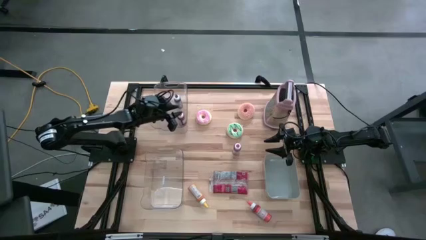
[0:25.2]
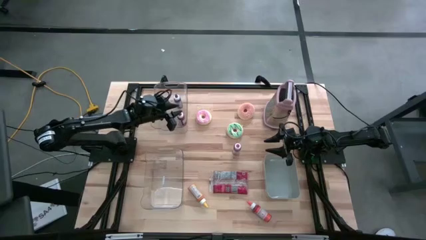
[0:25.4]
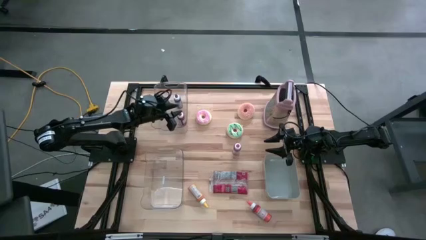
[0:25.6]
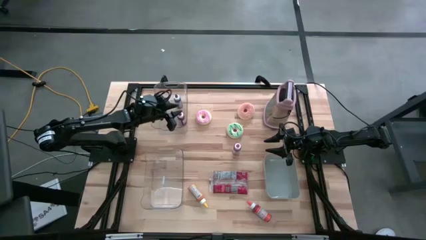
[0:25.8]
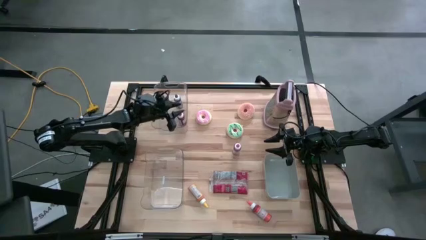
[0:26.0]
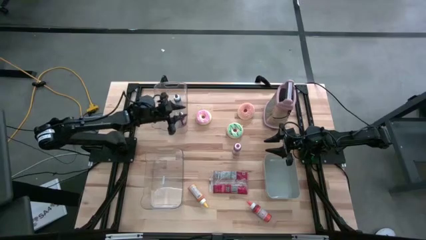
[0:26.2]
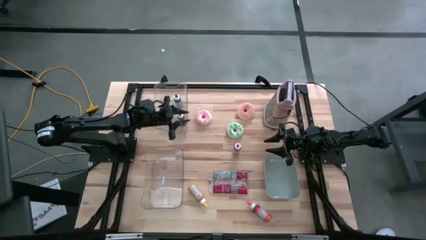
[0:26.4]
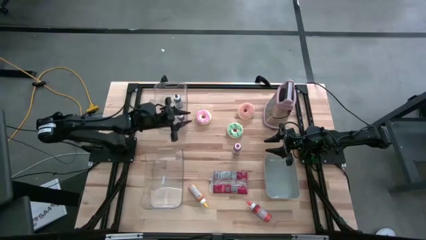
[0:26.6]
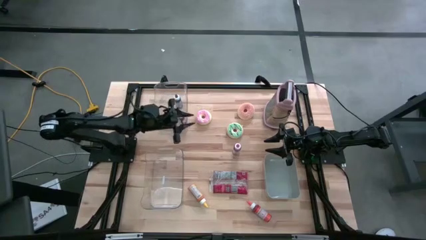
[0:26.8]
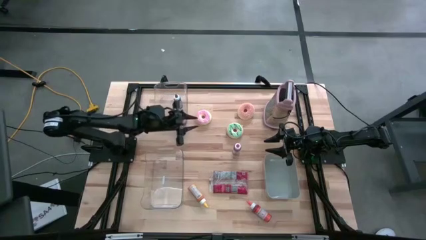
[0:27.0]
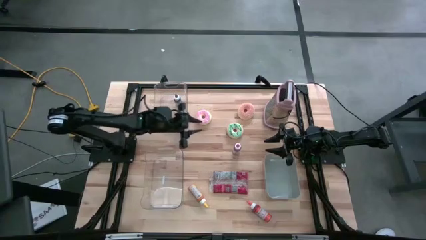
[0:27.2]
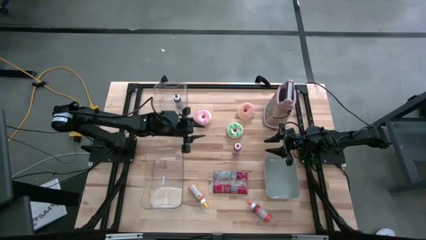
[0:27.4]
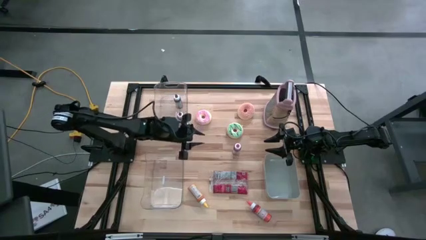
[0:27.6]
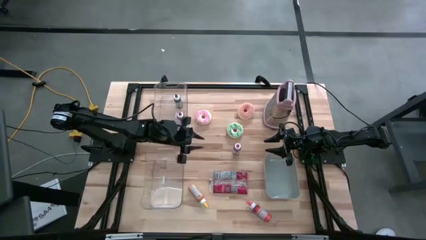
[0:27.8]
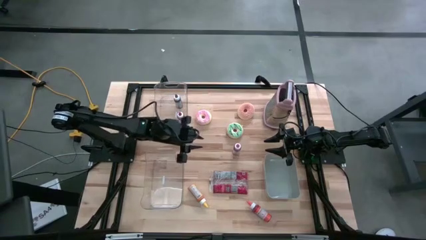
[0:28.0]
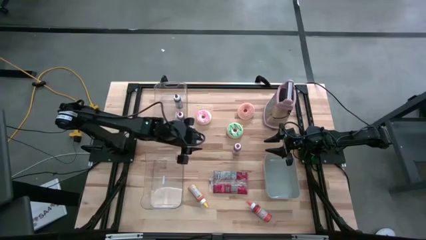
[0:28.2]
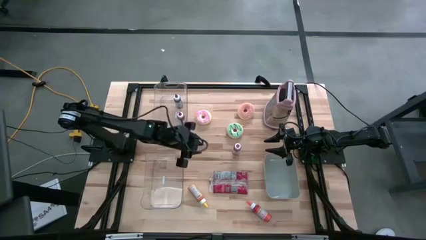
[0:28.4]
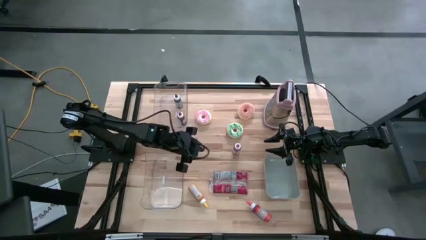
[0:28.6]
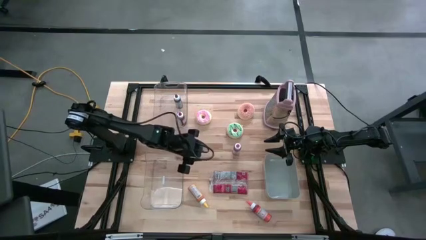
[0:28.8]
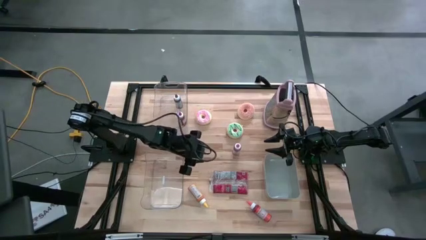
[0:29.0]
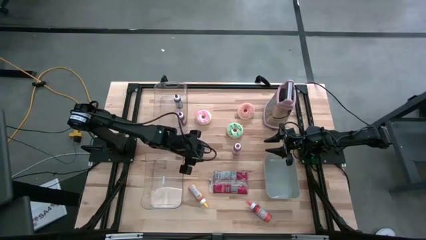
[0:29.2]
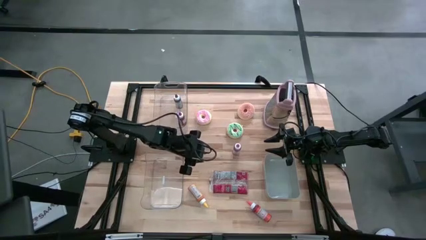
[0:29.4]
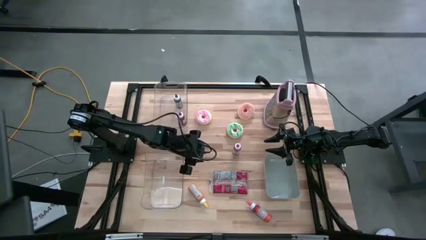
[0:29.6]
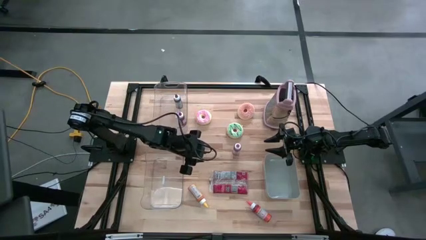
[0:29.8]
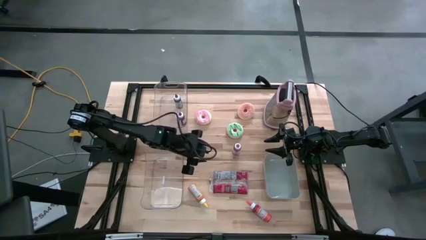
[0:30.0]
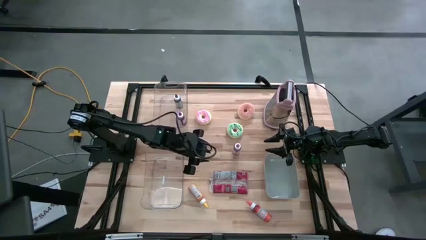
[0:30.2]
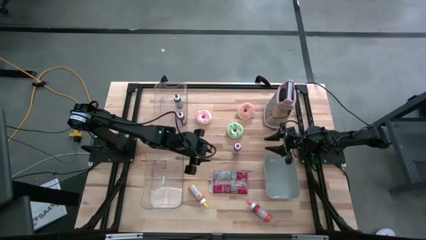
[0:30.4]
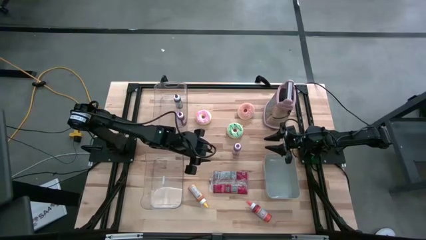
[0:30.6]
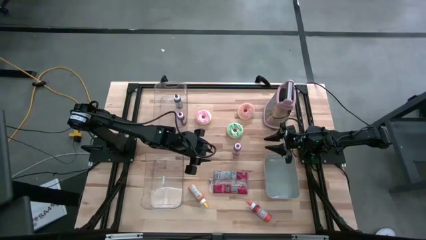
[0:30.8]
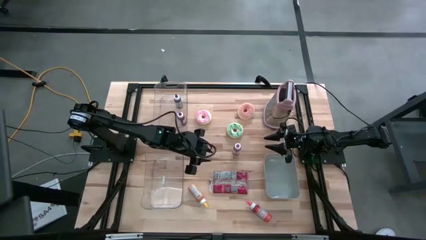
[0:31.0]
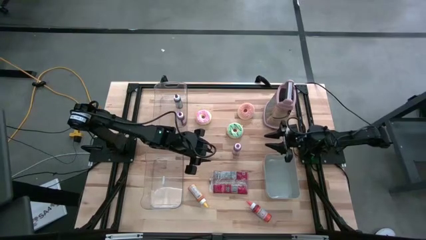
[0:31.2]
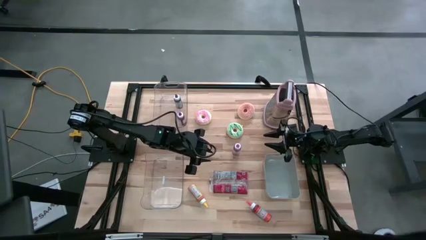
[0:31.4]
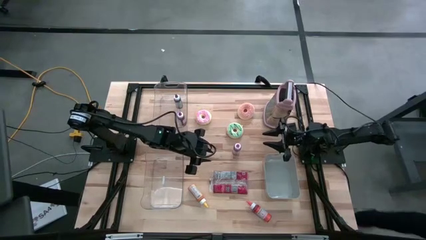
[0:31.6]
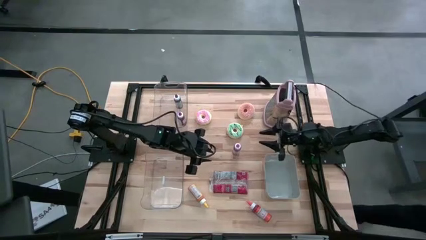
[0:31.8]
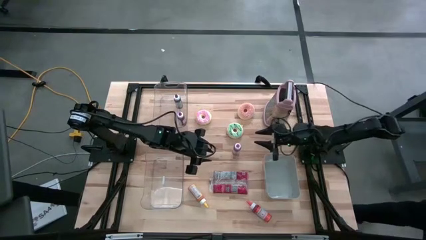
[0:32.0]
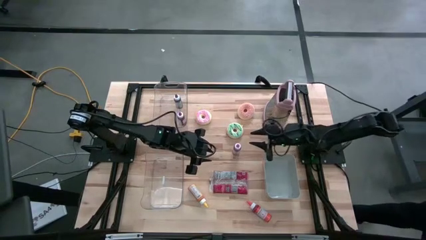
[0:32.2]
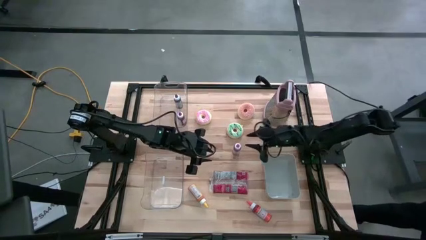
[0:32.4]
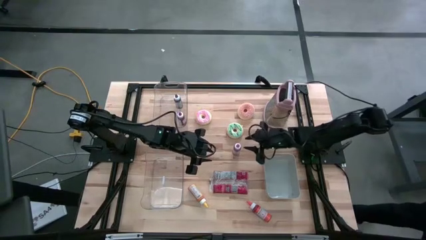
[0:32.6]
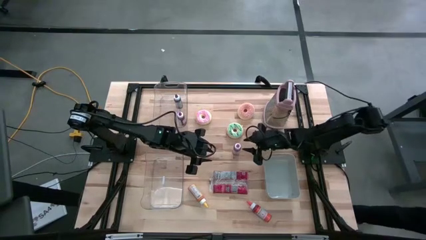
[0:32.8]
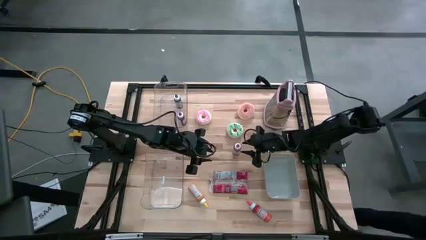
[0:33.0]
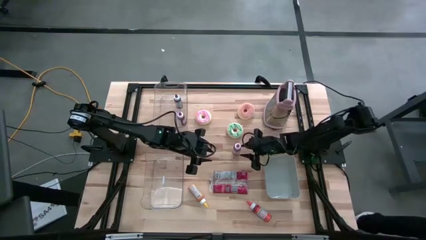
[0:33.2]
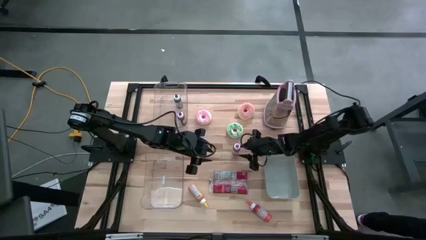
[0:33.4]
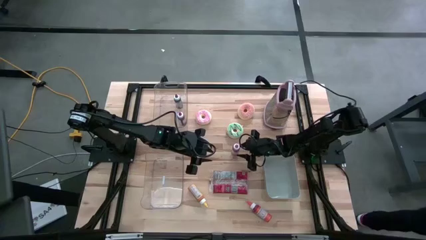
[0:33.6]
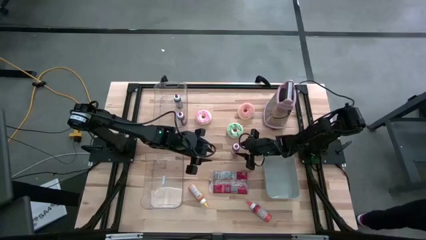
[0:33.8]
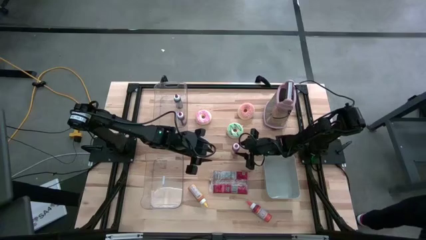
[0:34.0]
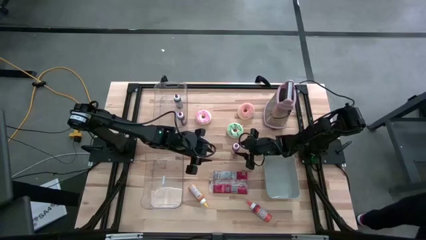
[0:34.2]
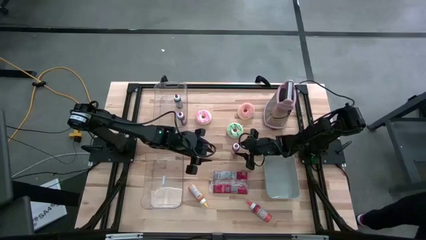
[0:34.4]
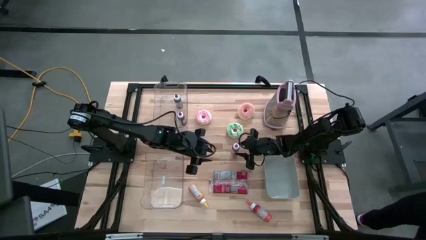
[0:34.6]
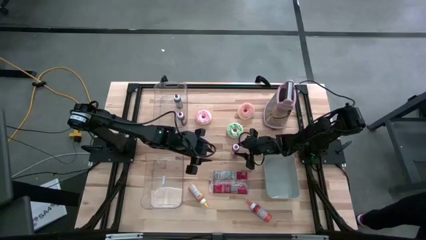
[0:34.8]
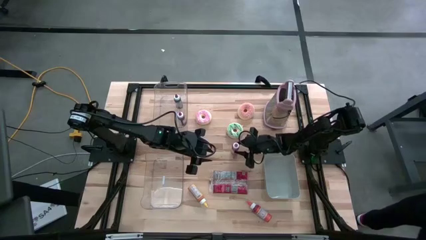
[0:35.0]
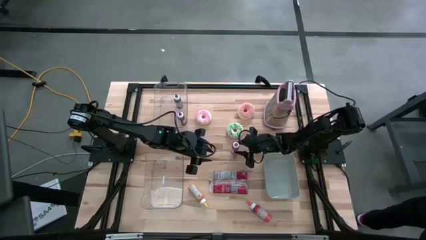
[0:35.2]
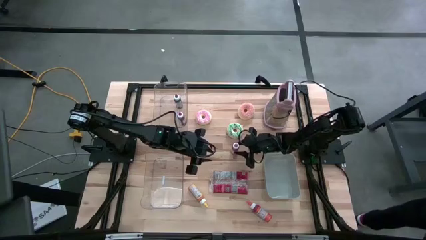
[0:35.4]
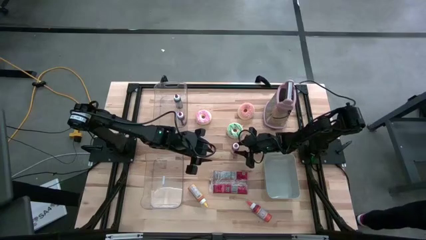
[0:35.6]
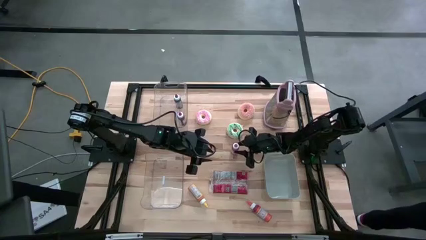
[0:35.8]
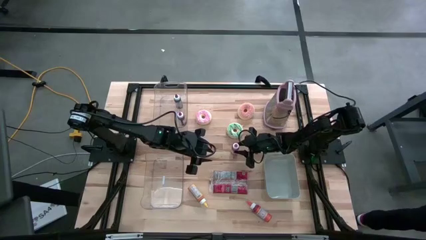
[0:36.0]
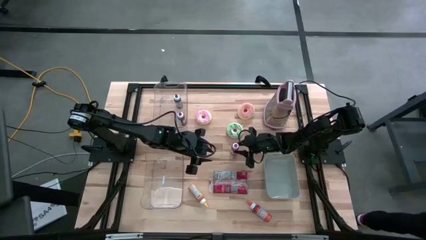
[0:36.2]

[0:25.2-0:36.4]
Put the pink food coloring bottle into the top transparent bin
